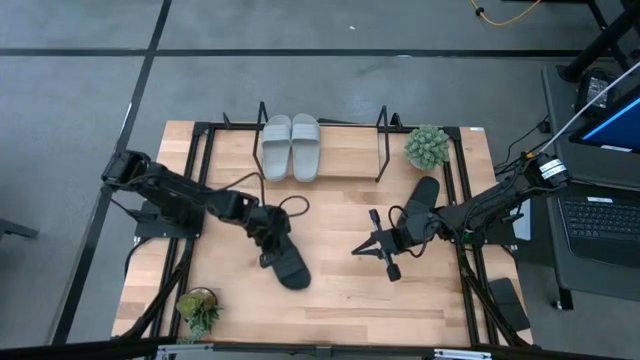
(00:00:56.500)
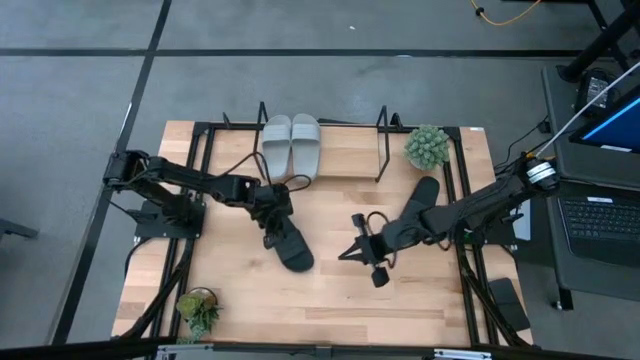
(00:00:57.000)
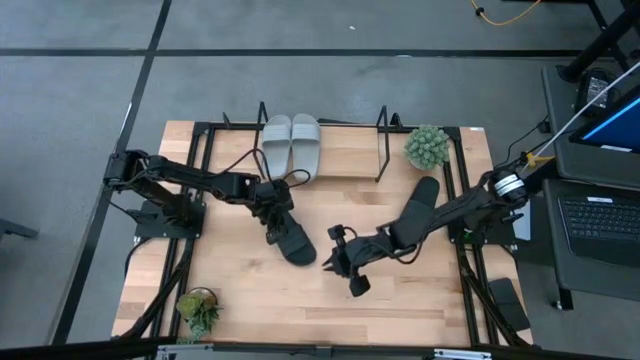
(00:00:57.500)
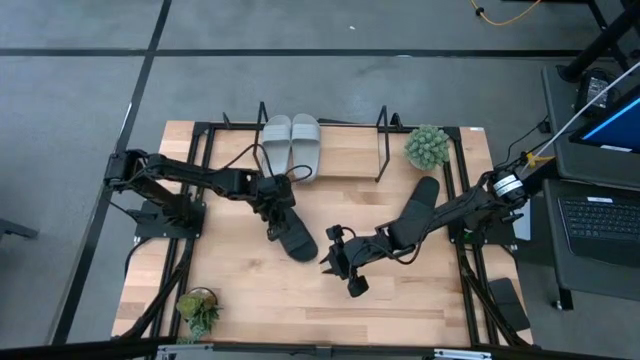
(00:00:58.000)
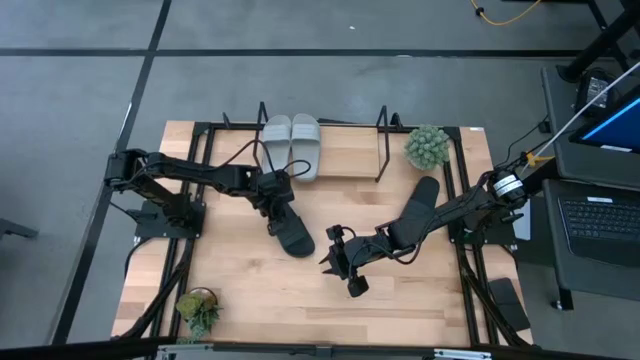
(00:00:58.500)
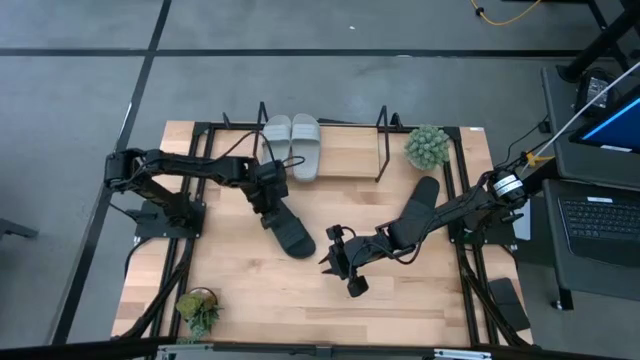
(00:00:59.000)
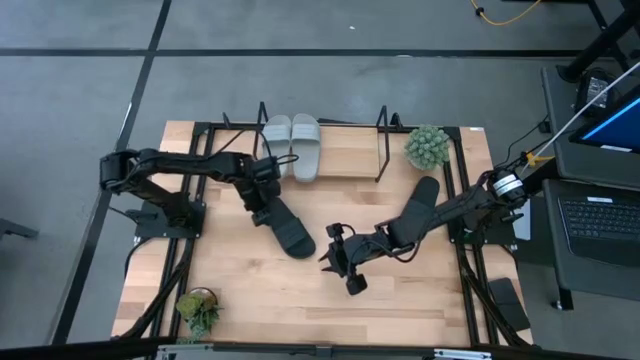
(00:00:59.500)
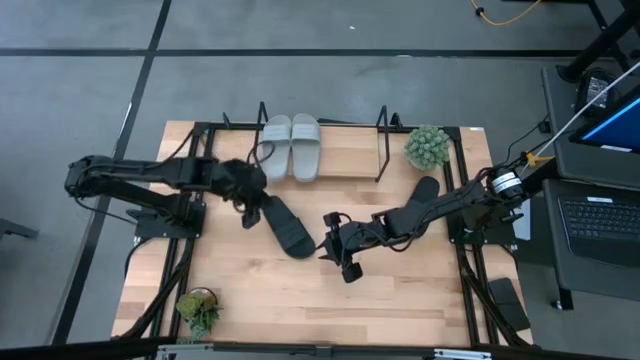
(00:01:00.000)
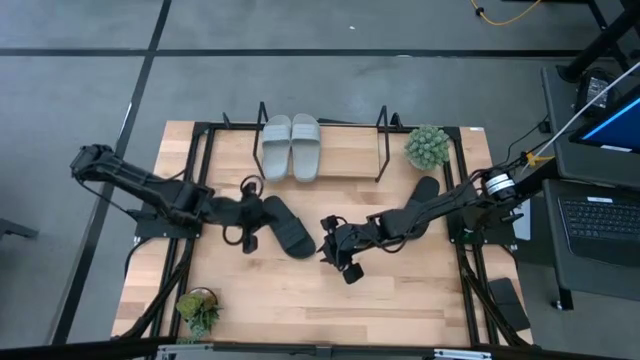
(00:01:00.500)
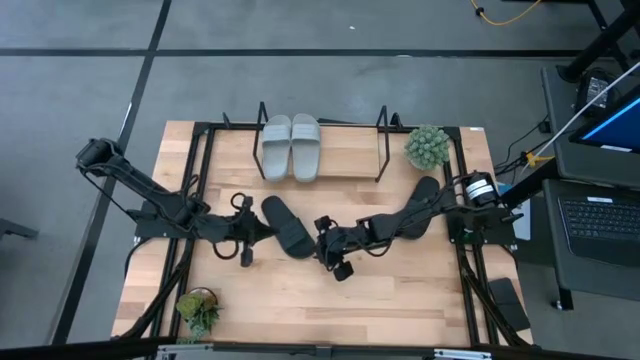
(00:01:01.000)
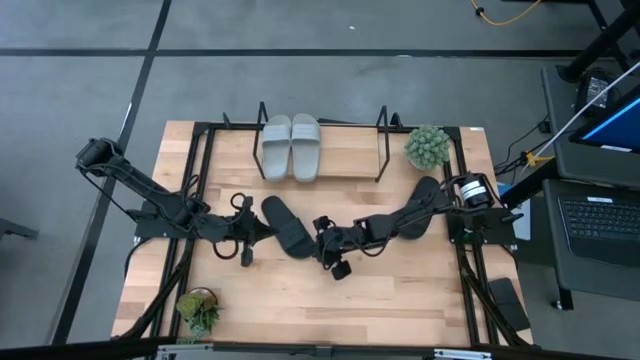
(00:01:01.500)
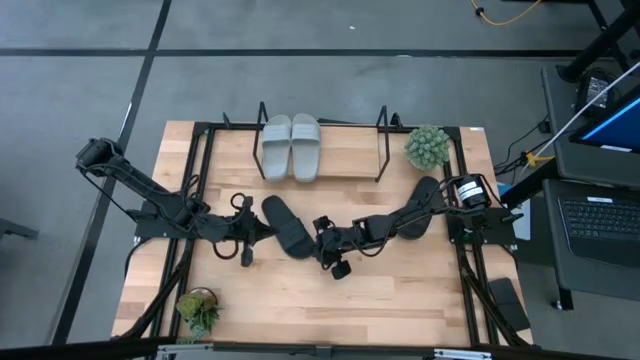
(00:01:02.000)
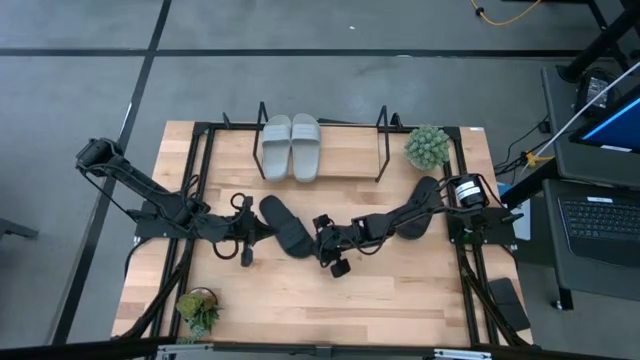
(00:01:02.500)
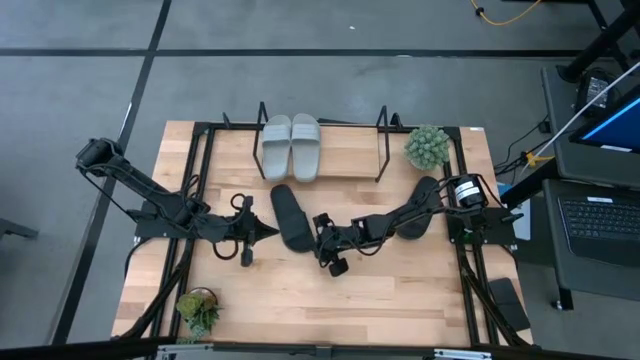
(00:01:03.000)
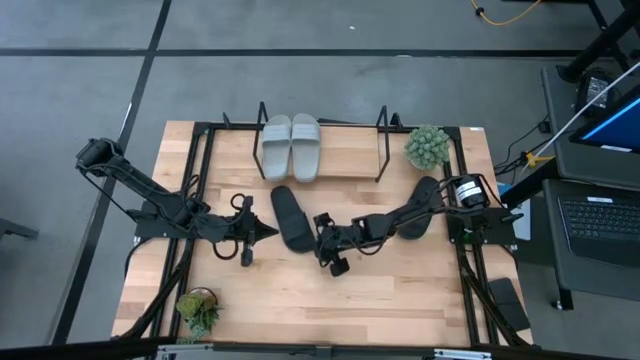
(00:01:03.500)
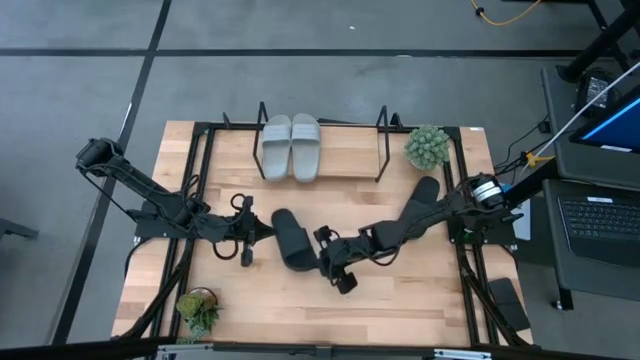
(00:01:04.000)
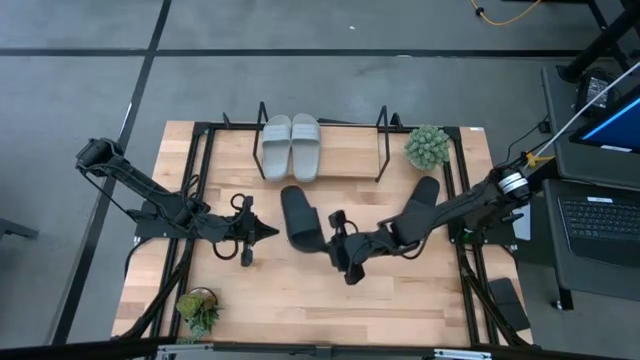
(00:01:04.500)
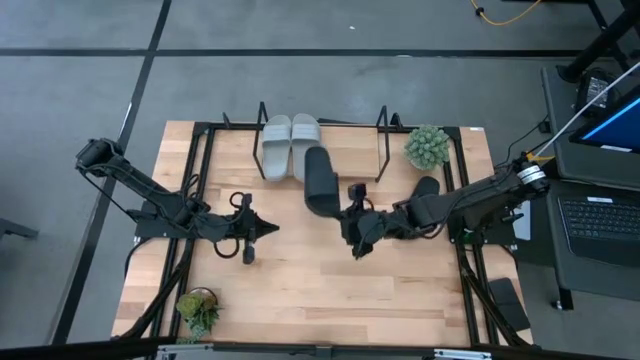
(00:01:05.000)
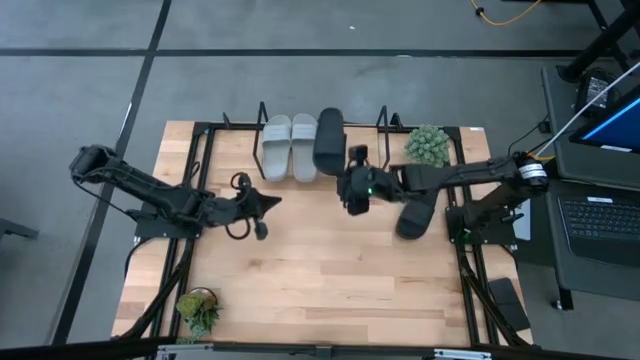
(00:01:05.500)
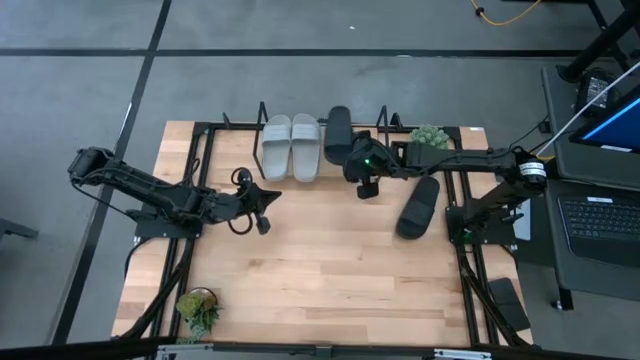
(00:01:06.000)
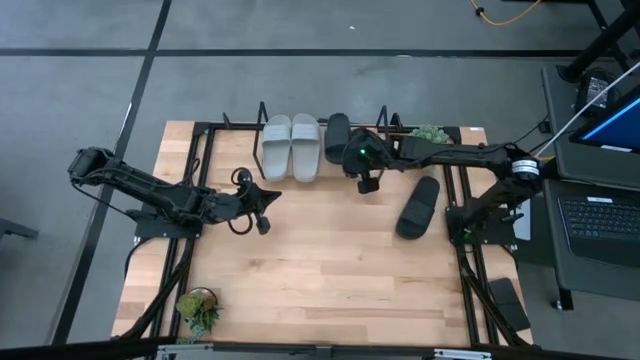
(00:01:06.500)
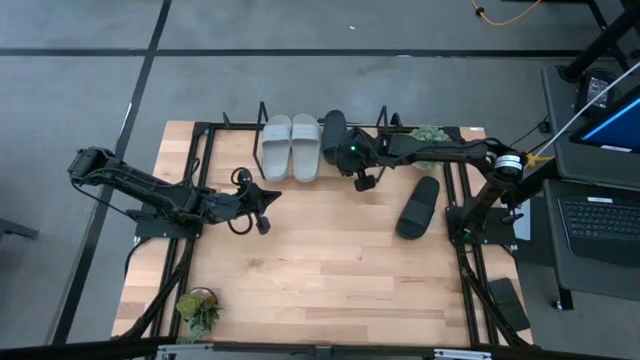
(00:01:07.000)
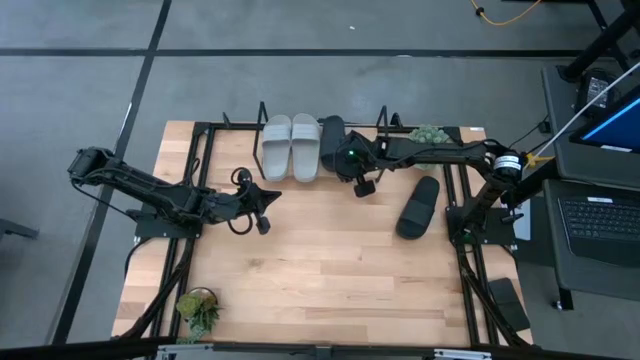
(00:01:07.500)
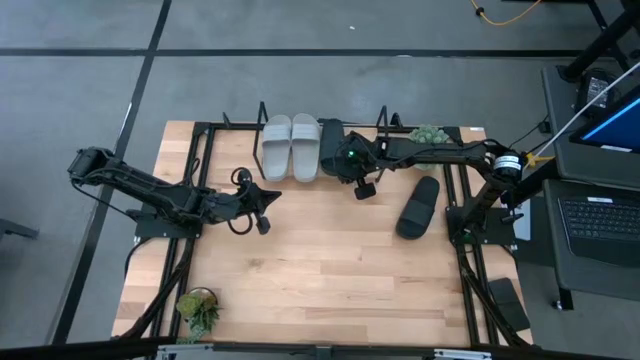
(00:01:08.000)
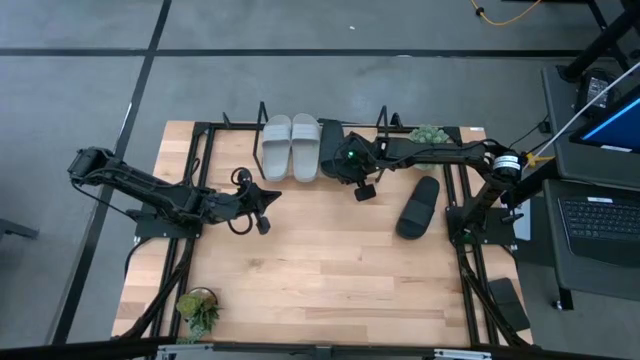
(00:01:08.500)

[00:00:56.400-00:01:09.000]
Task: Pick and place slides into the shelf
Put the left black slide on the shelf

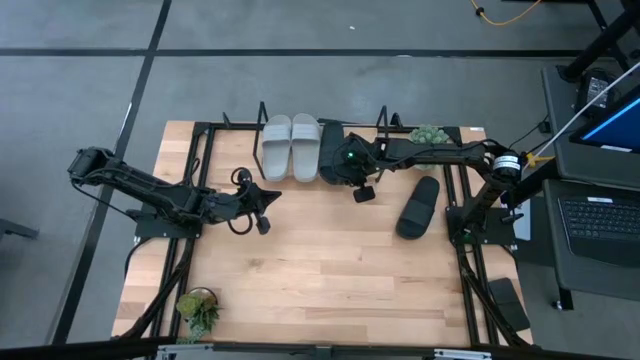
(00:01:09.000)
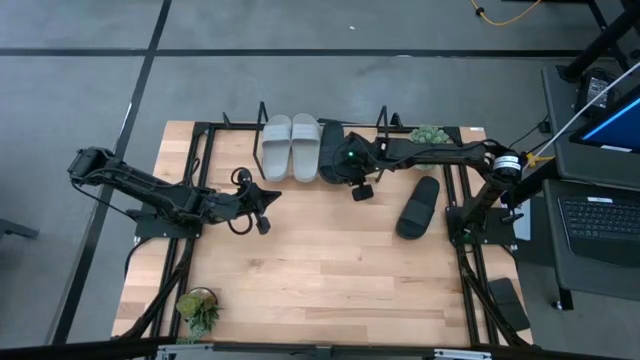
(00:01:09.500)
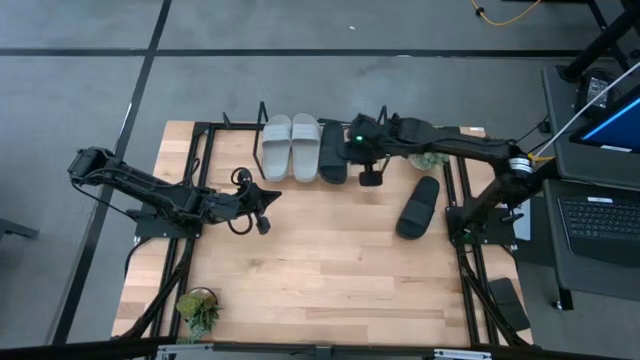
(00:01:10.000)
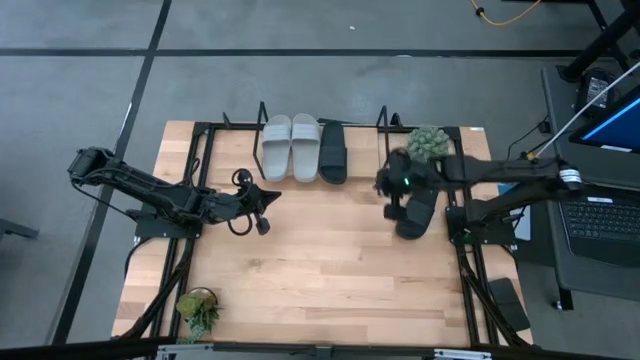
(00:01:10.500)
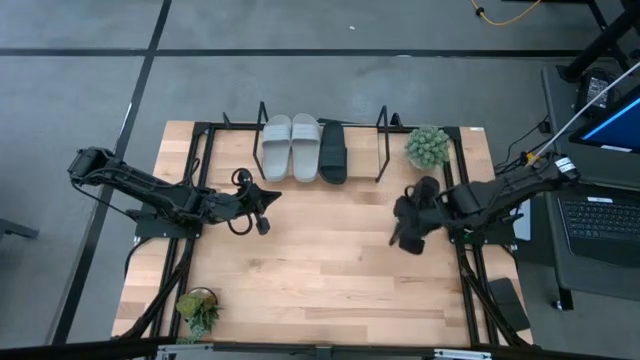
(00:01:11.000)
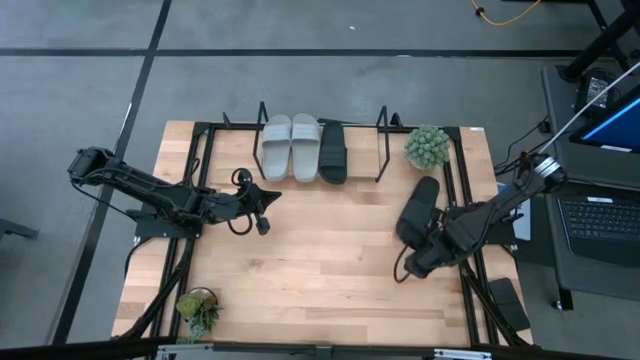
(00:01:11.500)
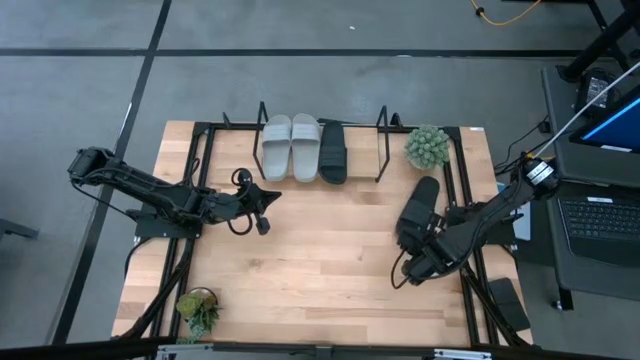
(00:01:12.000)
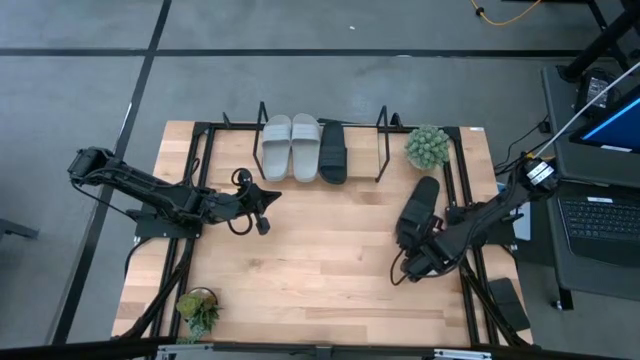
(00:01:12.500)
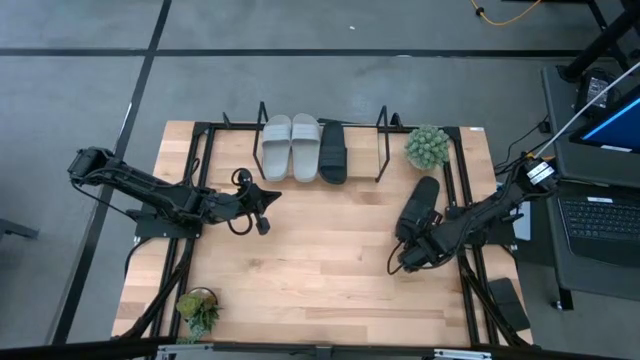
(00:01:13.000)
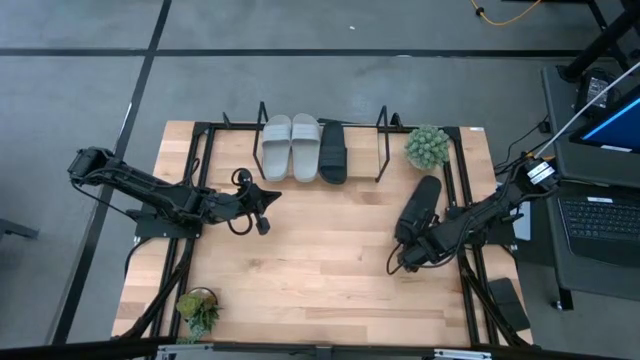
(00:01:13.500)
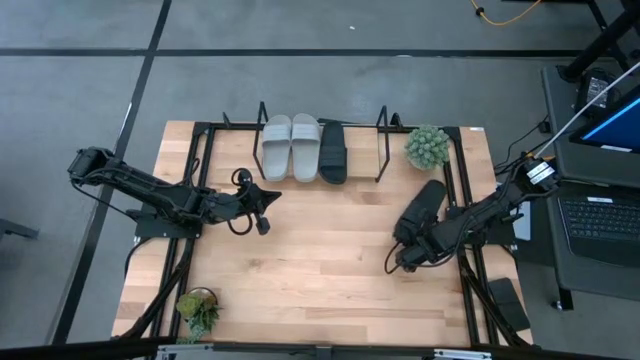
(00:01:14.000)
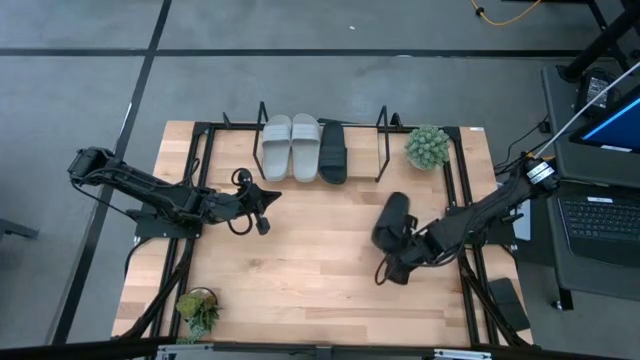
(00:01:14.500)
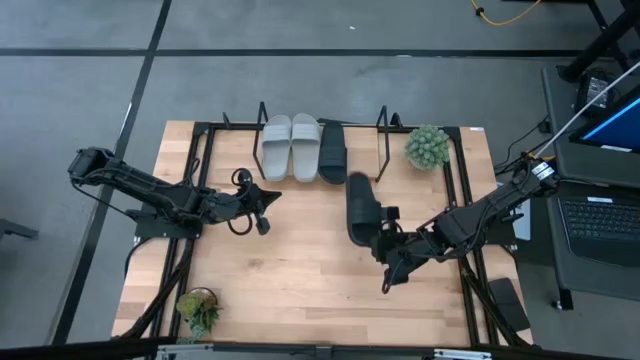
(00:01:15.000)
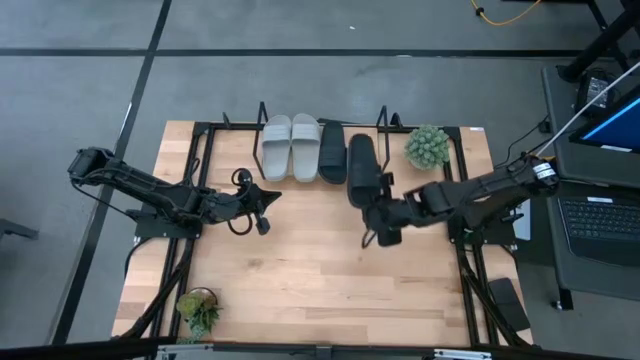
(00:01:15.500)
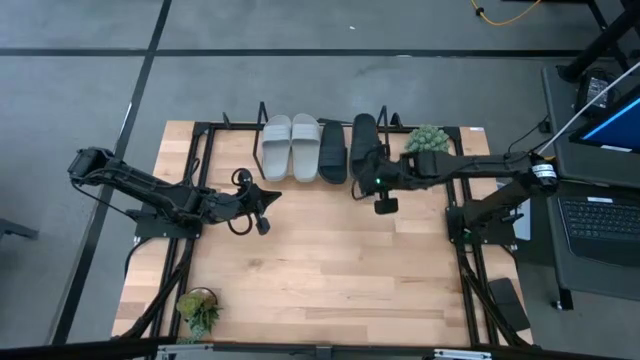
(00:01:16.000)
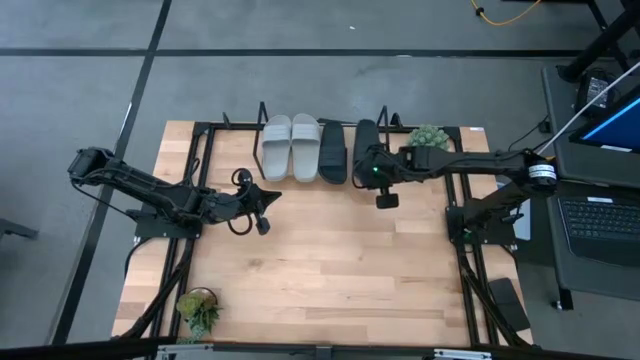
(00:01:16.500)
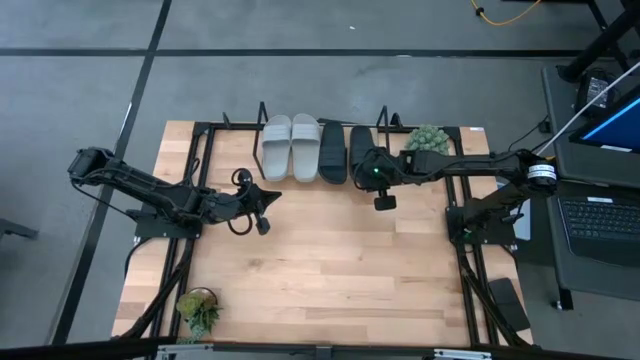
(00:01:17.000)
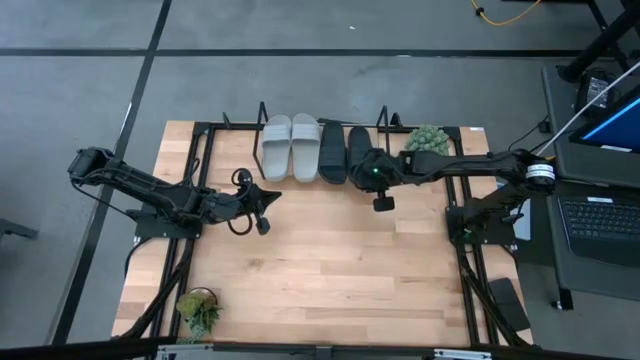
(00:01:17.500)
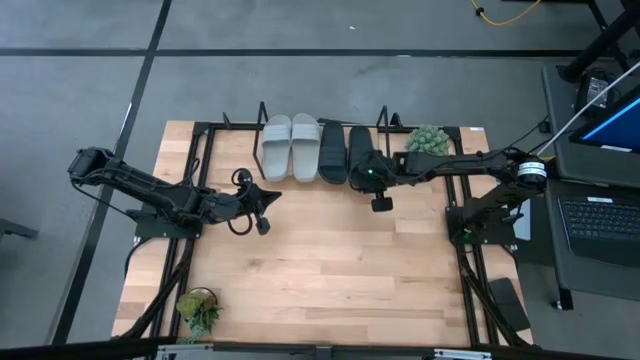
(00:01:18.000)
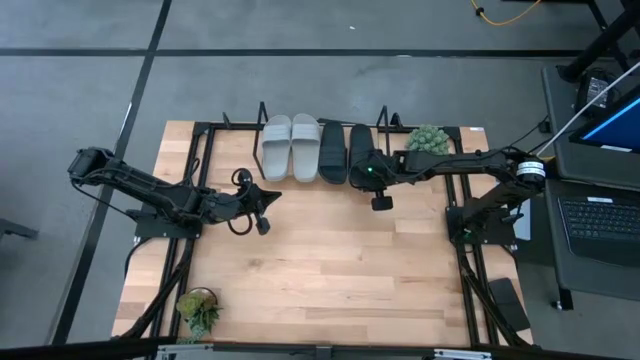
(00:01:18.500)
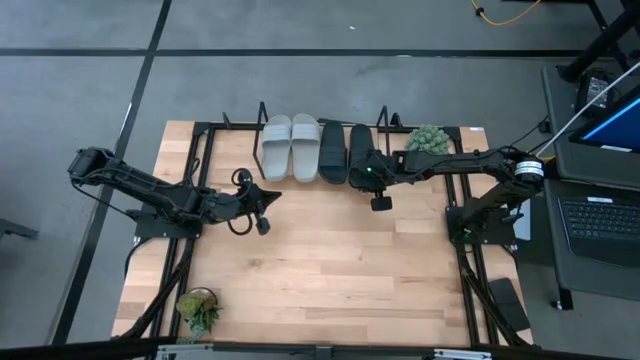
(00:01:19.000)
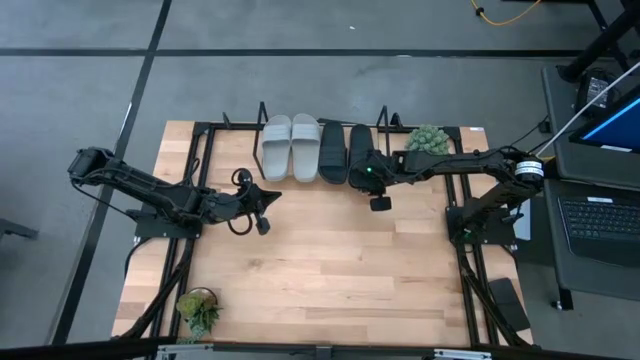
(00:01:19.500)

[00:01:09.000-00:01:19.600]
Put the black slide on the shelf
